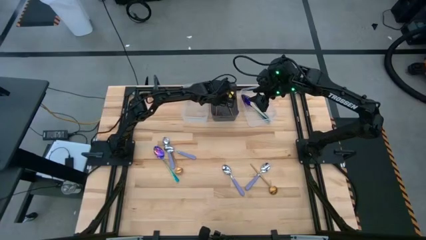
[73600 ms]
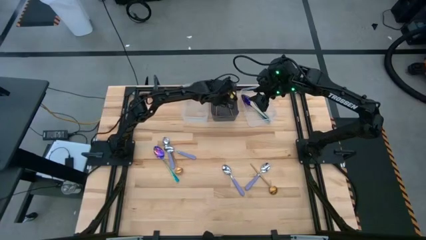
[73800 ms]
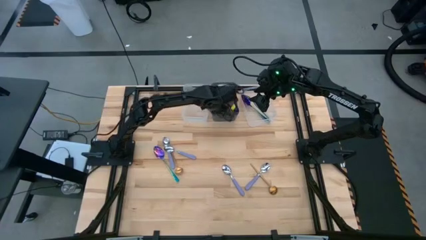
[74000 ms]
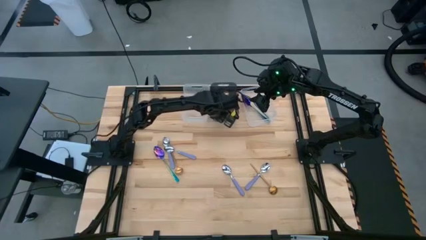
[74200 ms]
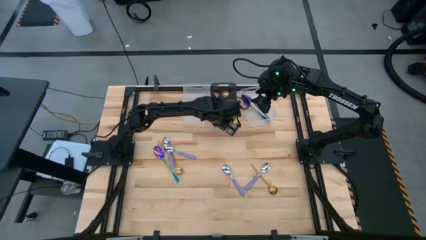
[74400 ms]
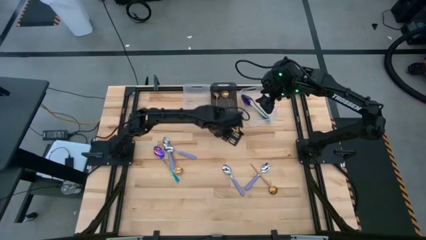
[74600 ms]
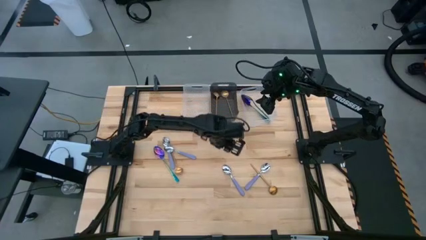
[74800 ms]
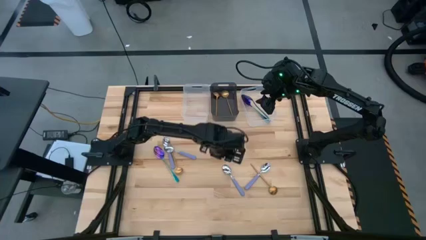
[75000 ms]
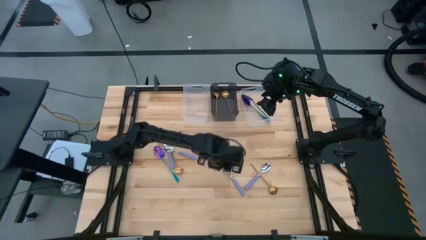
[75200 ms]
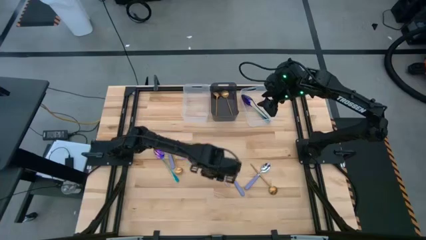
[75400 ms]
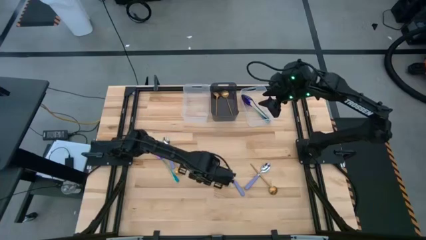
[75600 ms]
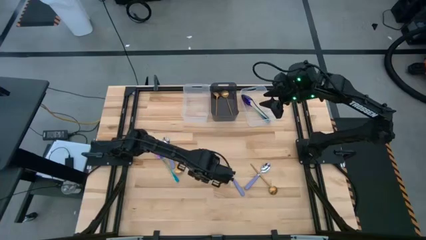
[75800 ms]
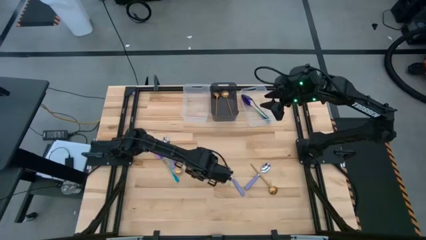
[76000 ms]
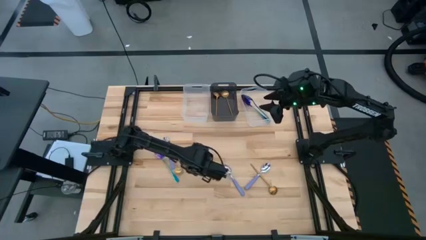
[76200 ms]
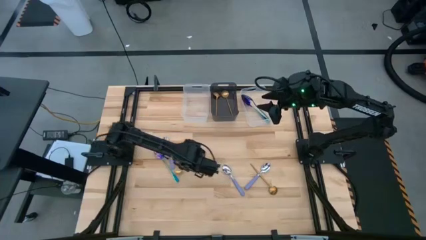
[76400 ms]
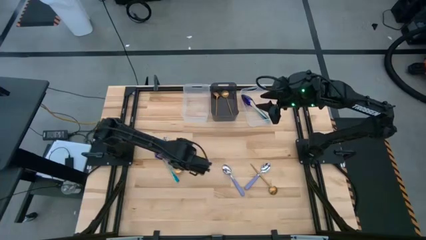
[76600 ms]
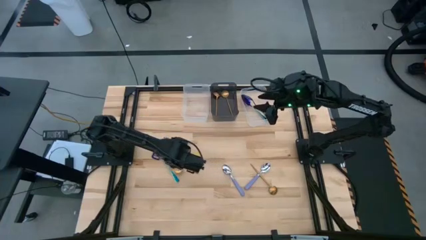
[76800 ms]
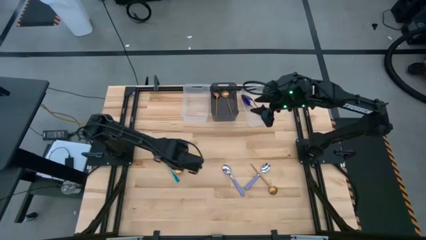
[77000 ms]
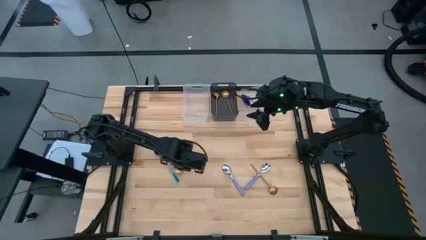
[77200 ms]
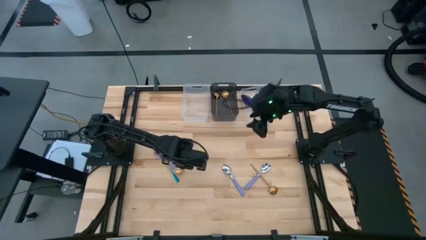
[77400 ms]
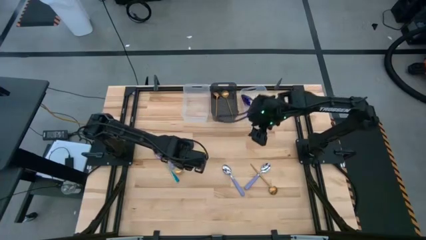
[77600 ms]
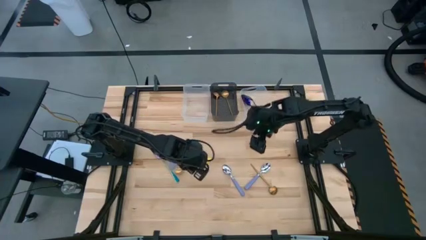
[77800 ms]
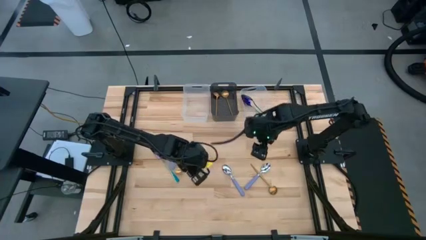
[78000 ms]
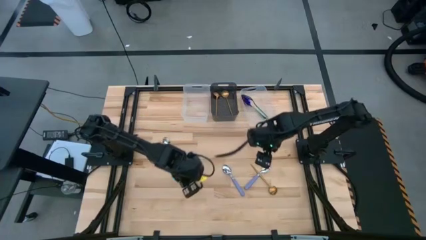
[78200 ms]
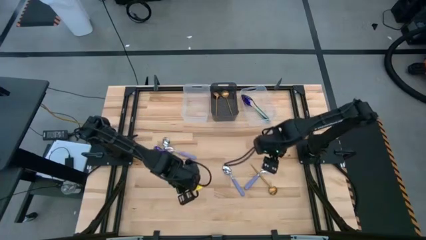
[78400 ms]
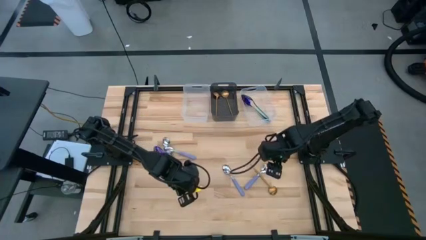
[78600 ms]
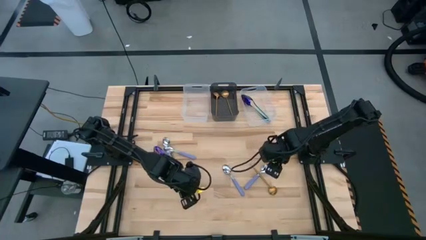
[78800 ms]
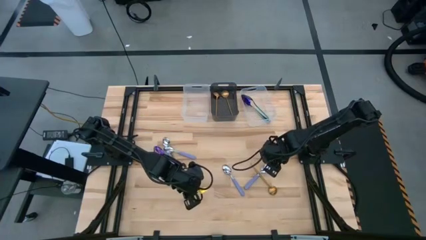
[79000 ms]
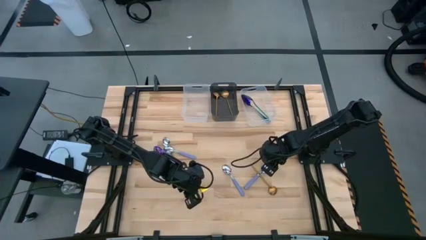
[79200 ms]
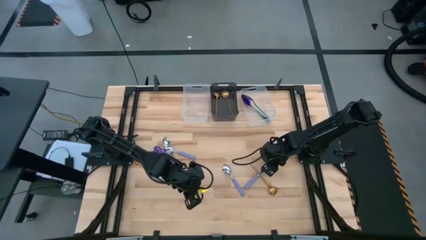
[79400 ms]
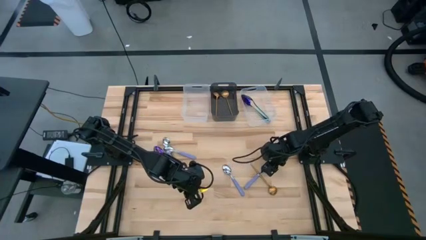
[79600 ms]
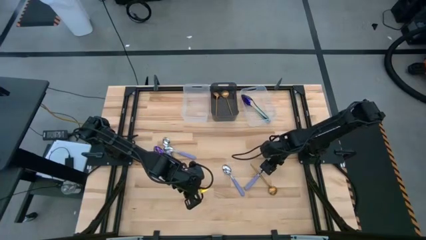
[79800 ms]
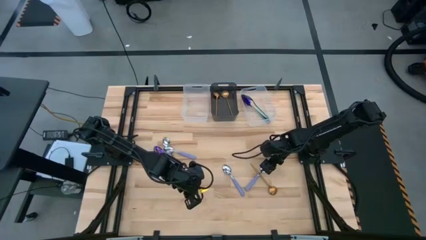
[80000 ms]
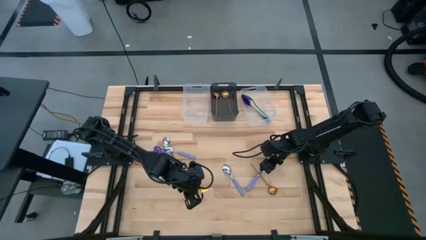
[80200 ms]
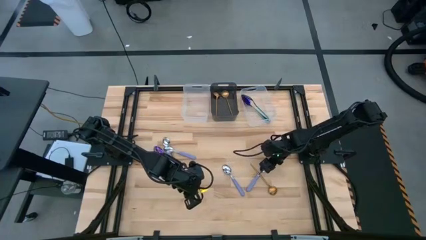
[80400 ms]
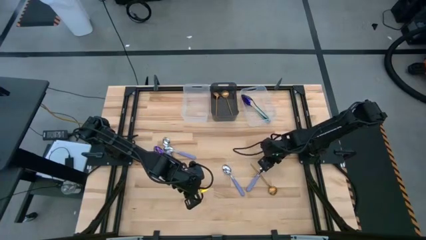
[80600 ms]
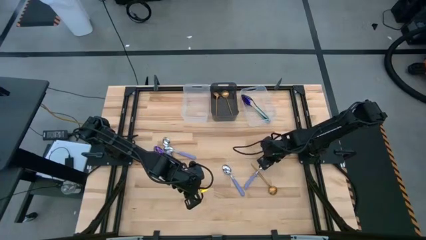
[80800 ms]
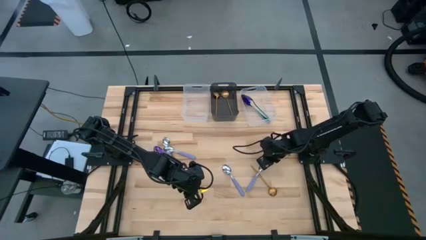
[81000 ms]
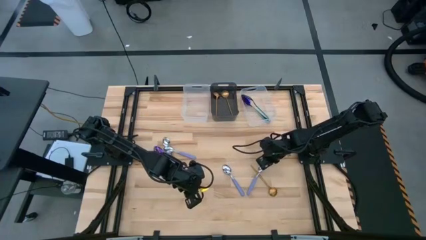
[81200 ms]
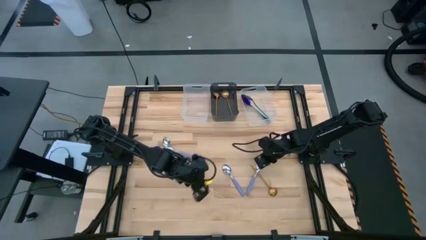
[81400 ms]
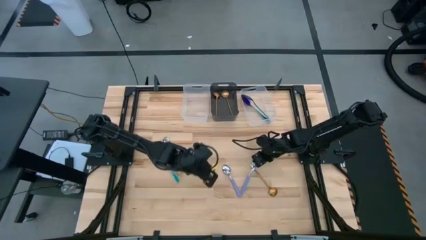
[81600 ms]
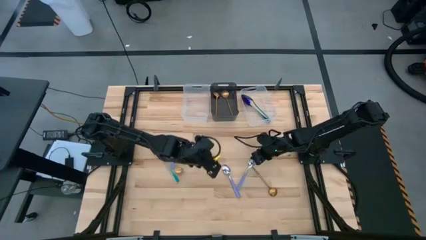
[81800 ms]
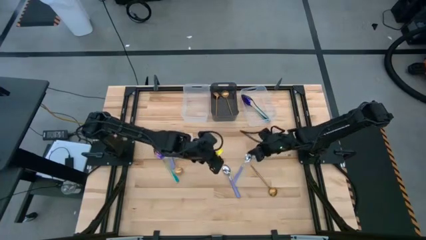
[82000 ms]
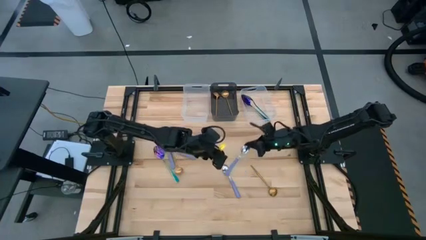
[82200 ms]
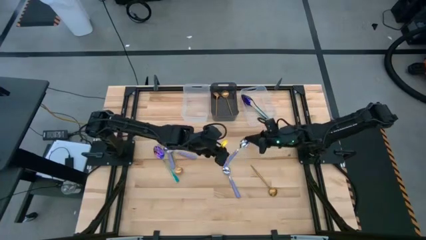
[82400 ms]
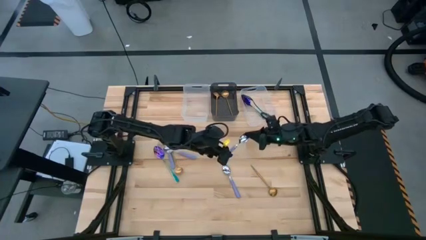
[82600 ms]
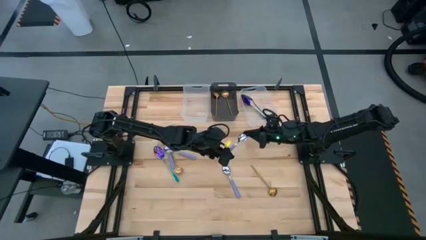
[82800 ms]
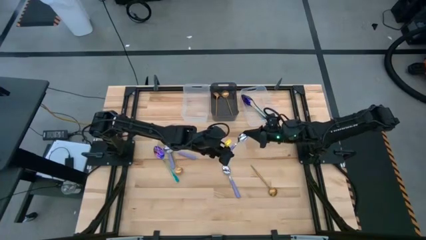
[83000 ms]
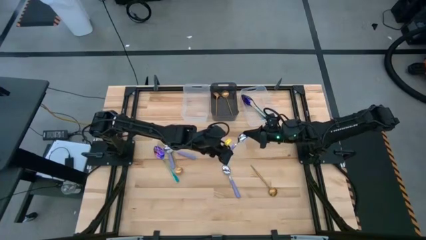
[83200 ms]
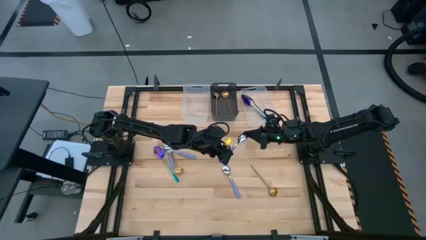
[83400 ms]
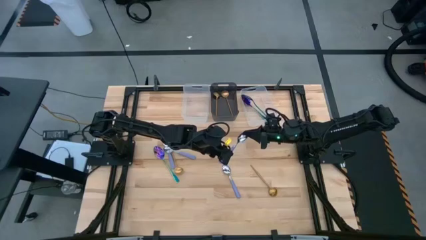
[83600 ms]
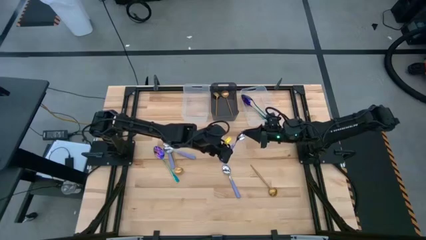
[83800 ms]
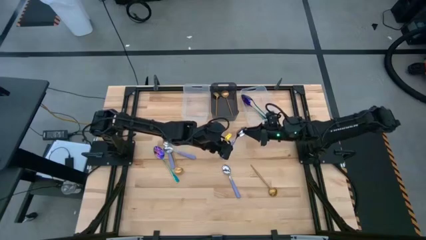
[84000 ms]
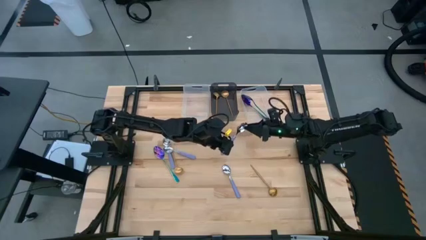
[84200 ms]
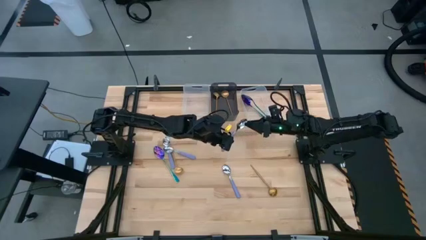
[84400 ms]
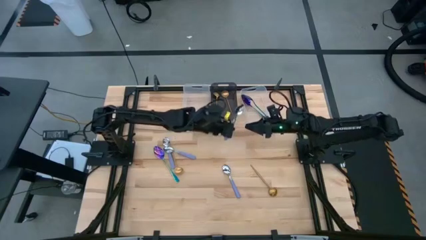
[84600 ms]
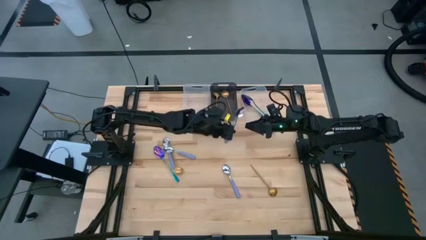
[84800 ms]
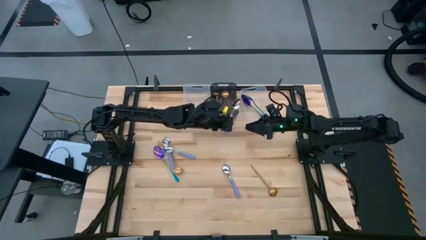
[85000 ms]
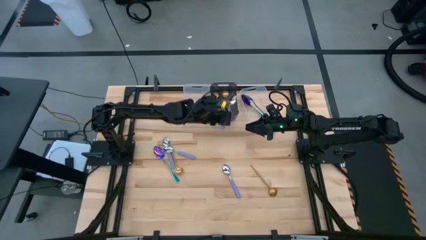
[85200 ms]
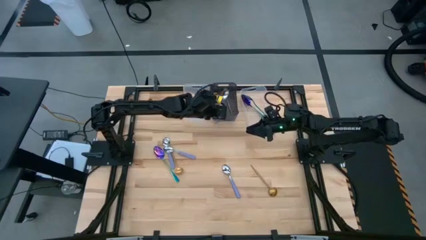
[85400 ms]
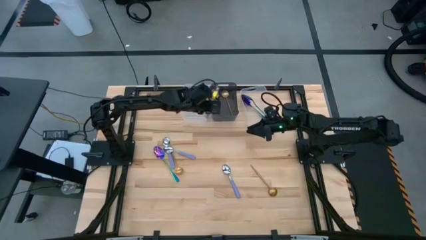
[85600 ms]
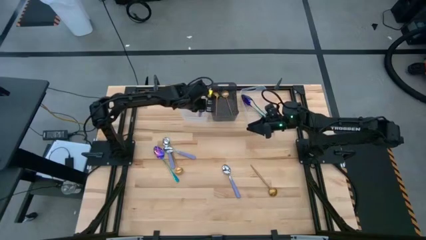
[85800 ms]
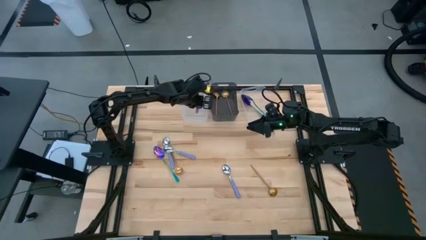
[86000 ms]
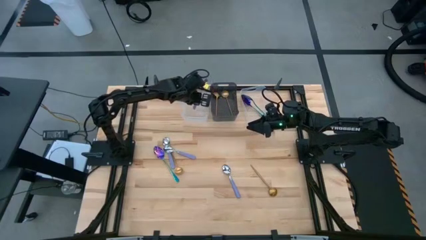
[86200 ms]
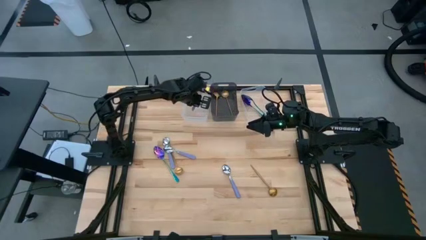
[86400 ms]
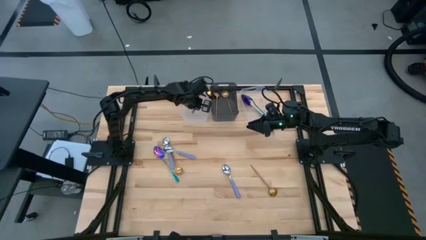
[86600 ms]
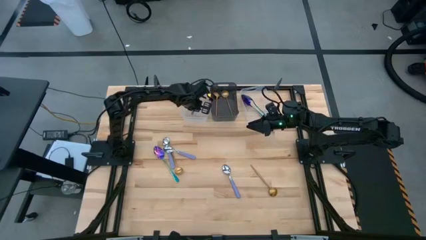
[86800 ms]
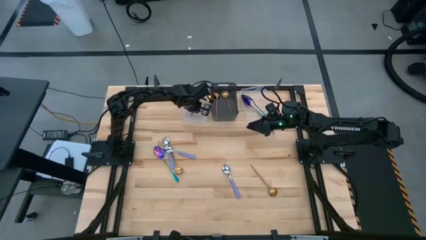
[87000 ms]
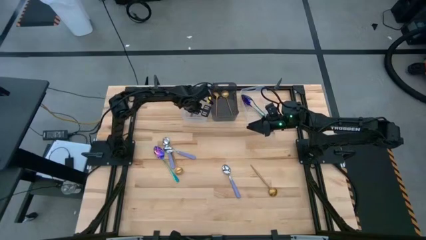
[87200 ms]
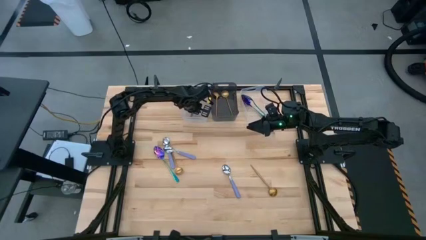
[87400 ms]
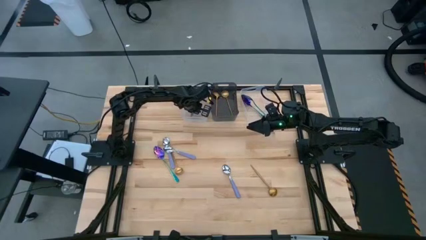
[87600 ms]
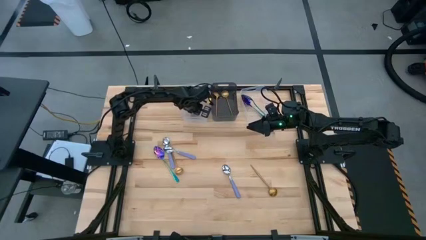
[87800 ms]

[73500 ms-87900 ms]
Task: Sort silverware by color (type)
Put the purple spoon into the left transparent bin

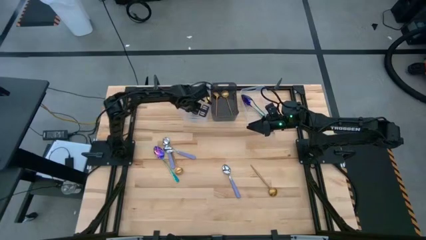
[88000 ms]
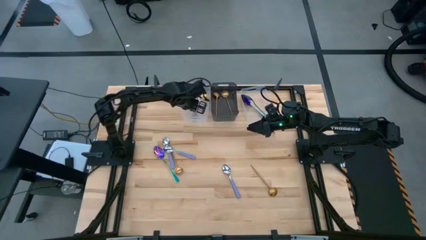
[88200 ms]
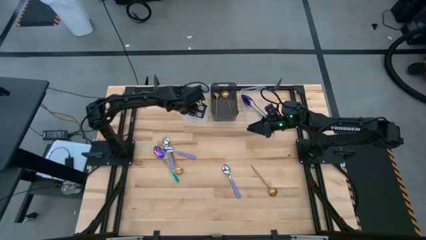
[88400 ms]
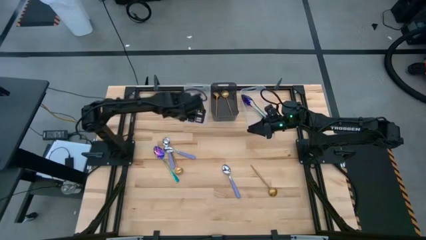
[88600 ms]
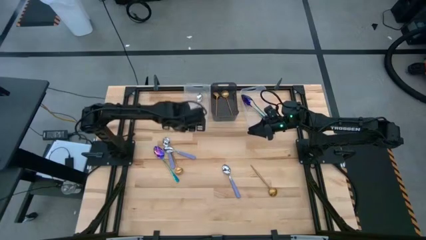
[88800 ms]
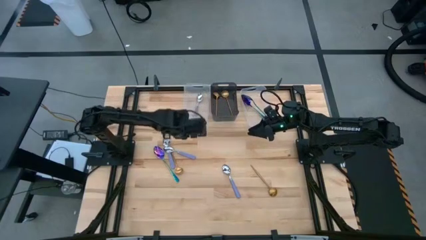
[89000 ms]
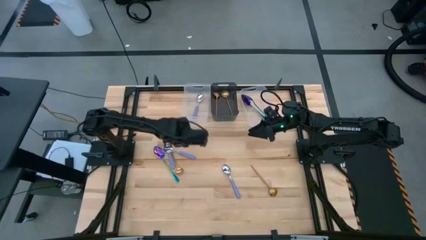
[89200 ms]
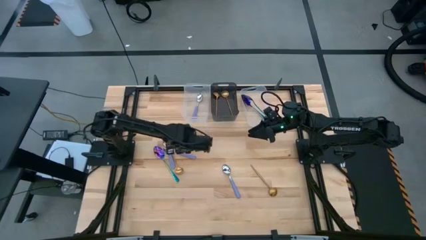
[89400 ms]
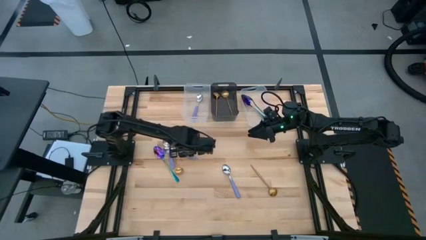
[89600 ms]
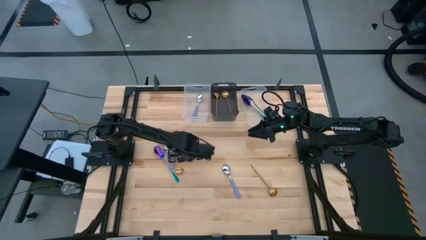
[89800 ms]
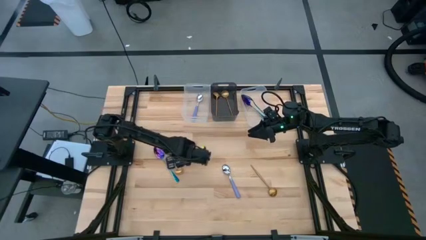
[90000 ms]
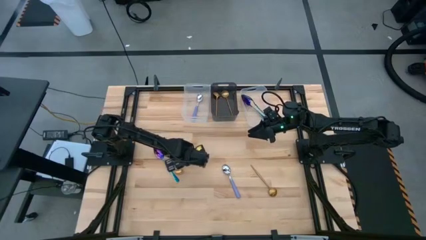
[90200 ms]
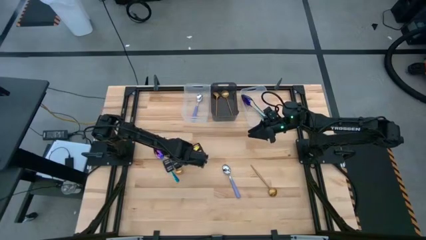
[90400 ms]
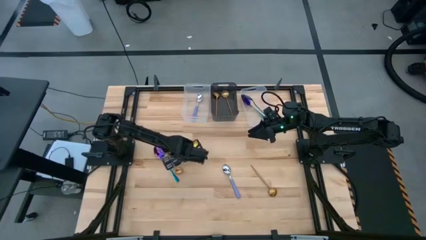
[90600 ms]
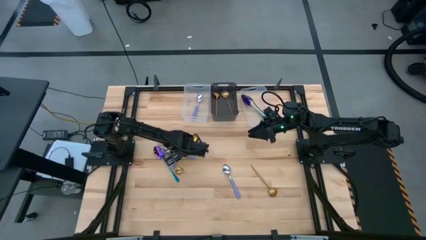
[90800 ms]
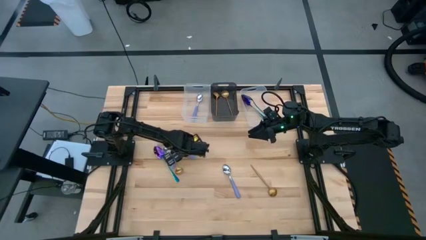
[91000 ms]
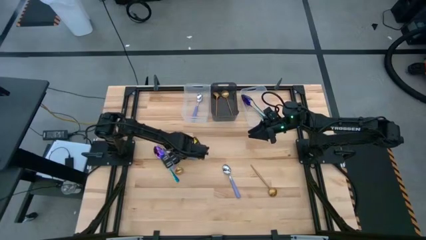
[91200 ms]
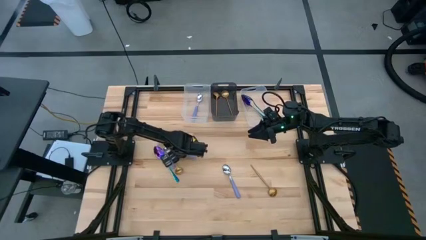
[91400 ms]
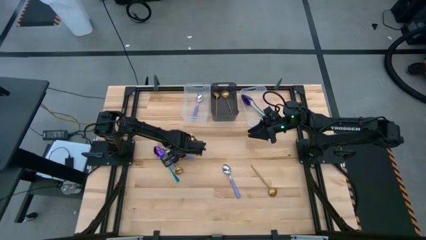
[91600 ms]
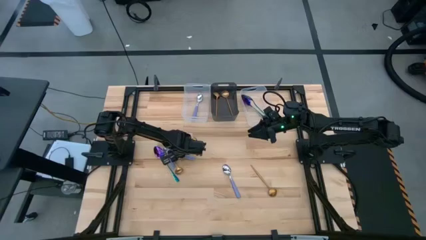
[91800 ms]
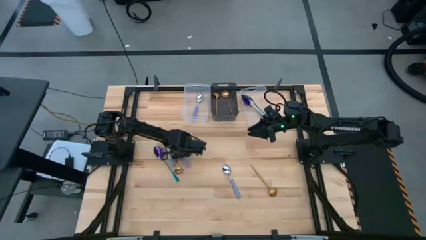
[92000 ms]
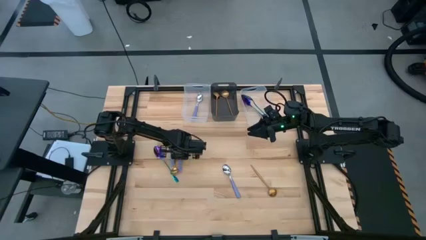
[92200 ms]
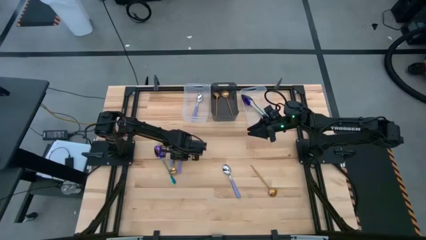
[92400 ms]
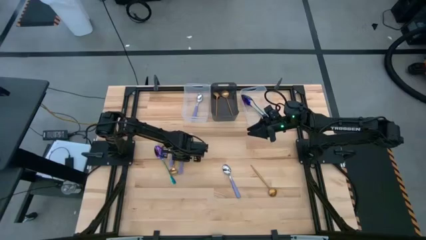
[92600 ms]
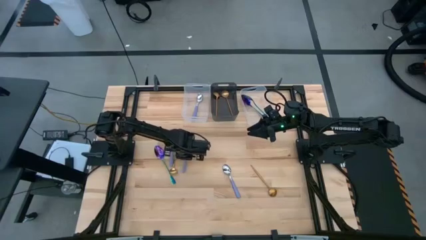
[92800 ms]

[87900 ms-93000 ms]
Put the purple spoon into the left transparent bin
